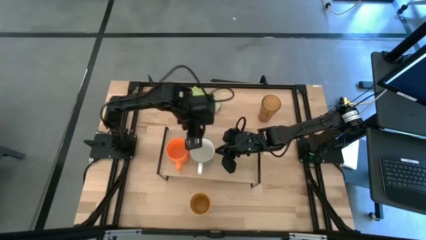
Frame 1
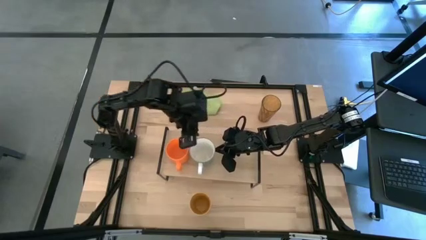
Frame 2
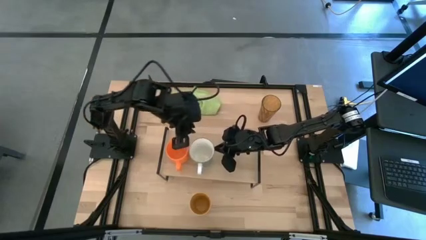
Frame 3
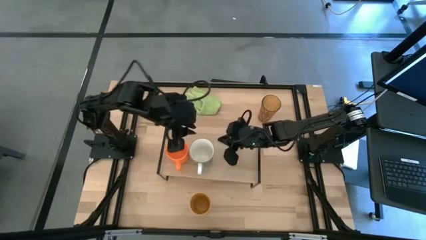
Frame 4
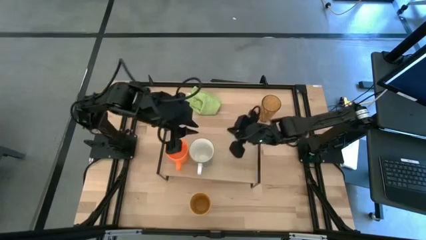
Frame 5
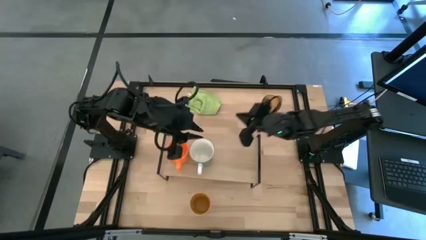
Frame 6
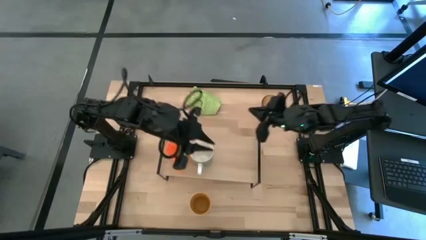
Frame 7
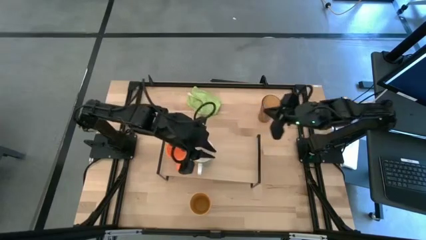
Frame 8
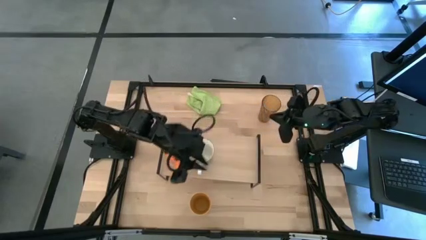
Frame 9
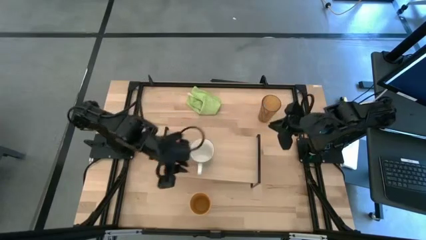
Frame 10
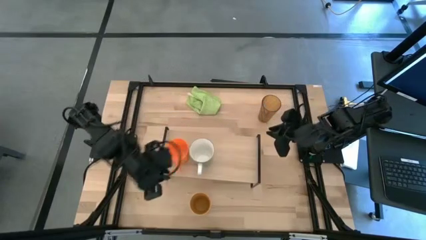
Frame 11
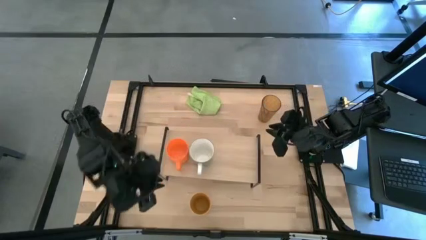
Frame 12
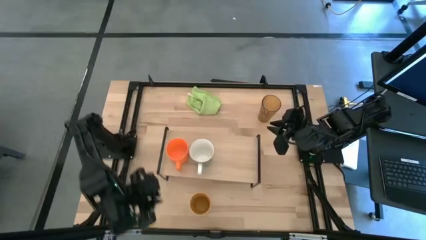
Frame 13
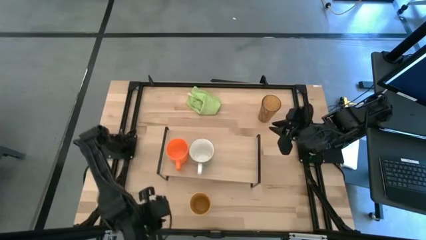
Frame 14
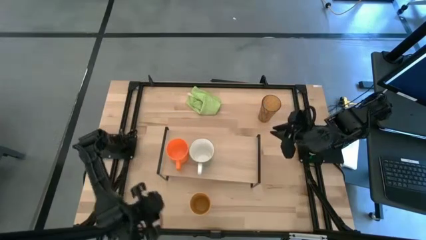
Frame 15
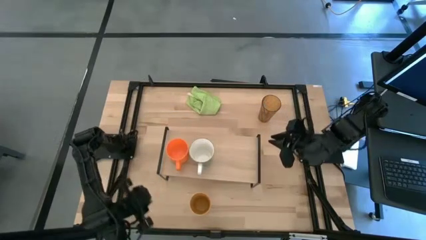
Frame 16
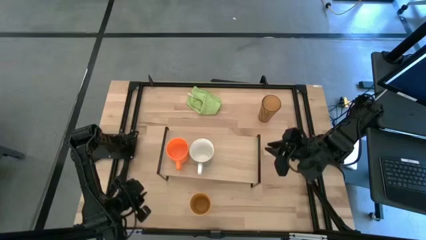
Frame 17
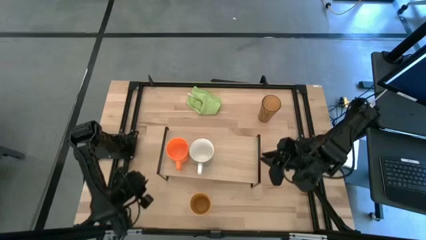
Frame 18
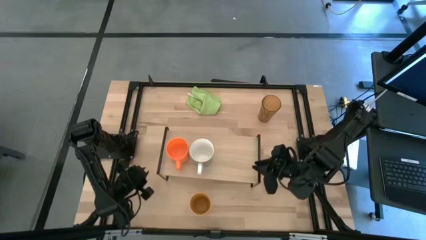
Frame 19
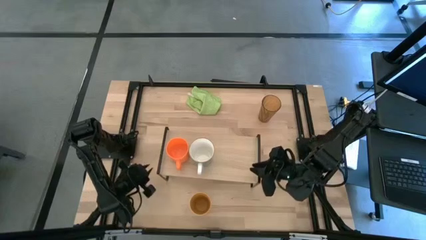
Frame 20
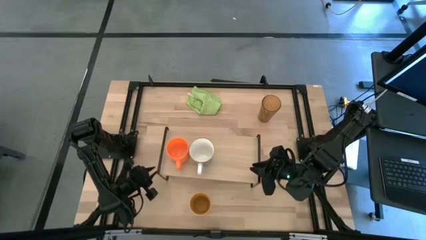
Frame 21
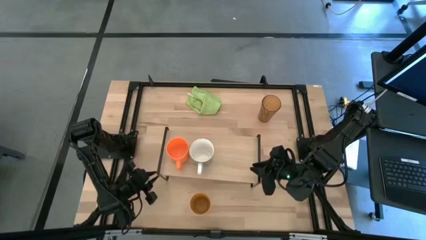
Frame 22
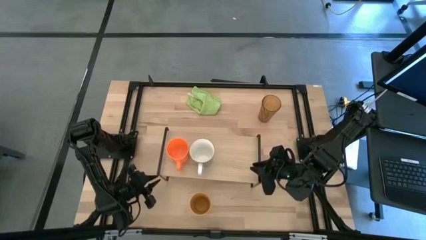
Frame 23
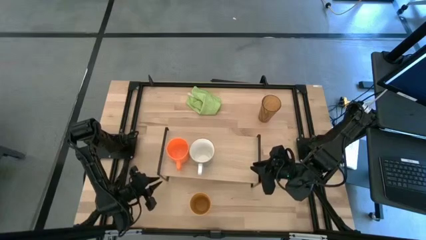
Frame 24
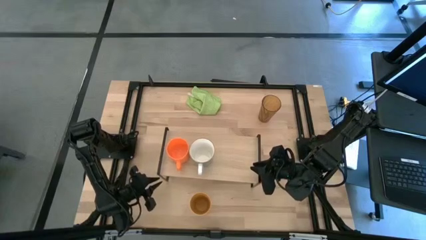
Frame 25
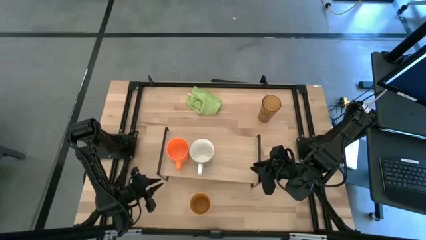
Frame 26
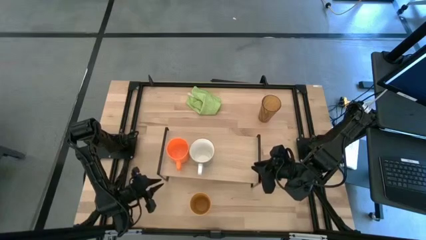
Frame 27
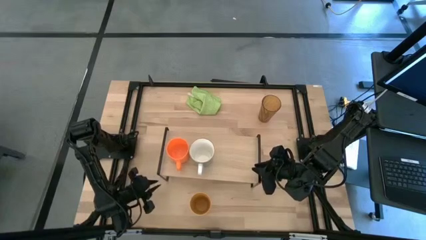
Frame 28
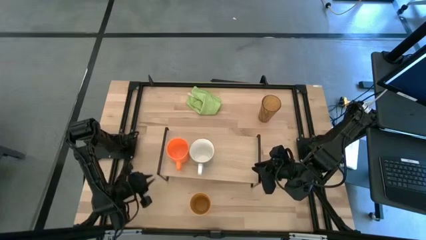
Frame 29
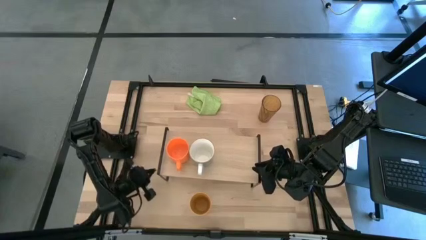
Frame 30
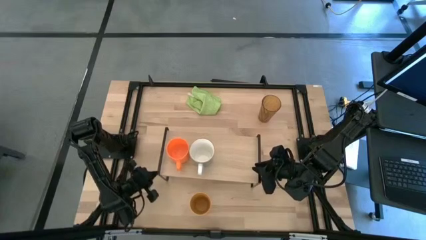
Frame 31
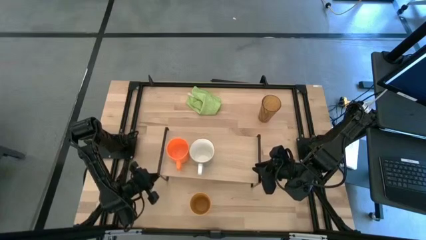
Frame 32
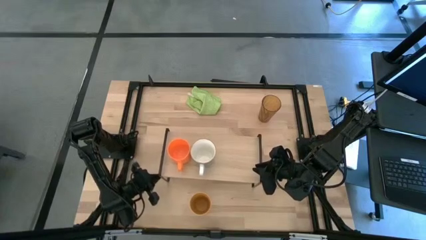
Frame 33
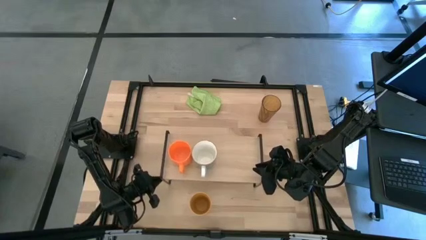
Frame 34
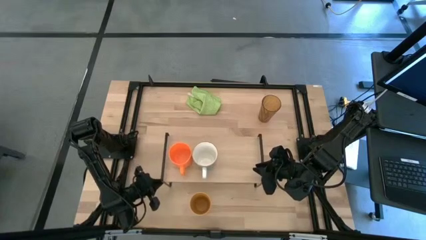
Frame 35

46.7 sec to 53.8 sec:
Task: Stack small to large cups/mugs on shelf
Adjust the shelf

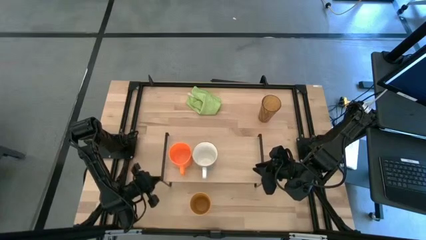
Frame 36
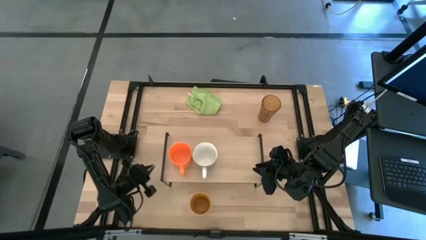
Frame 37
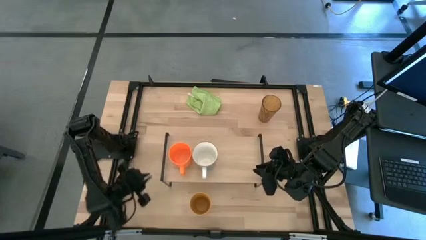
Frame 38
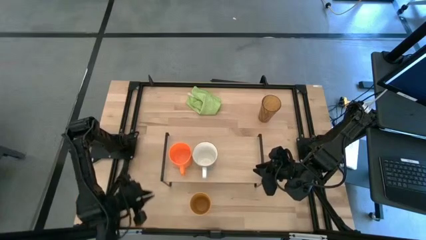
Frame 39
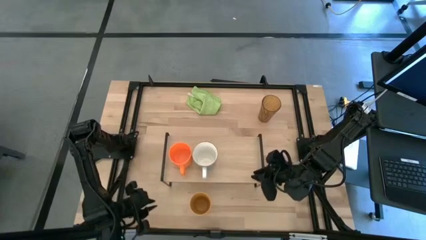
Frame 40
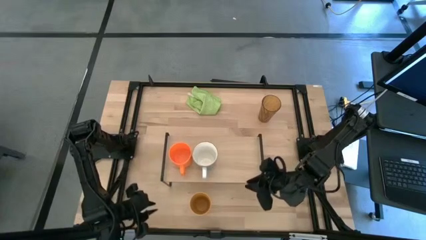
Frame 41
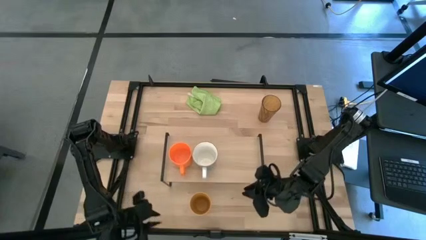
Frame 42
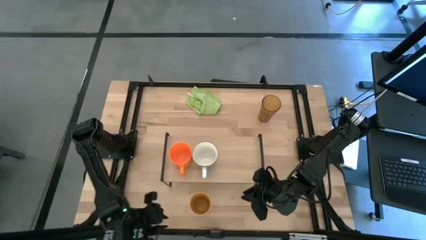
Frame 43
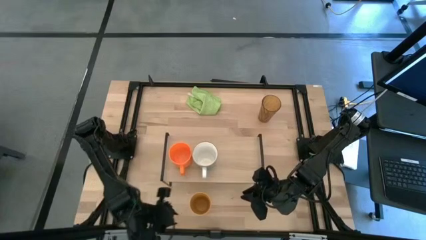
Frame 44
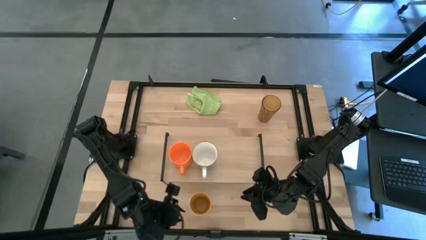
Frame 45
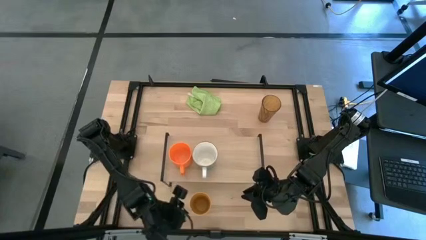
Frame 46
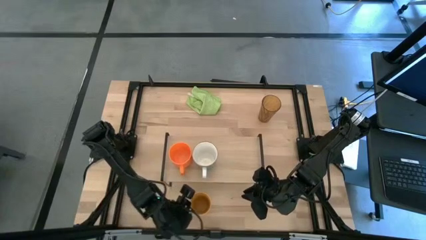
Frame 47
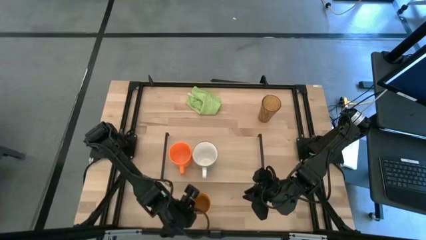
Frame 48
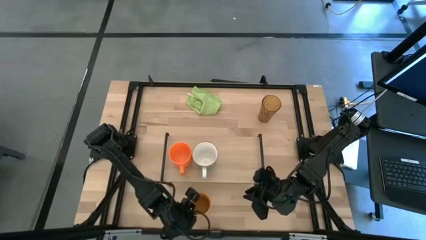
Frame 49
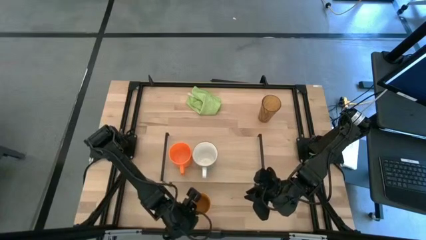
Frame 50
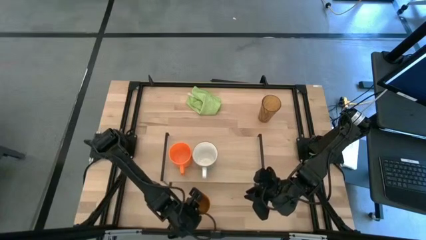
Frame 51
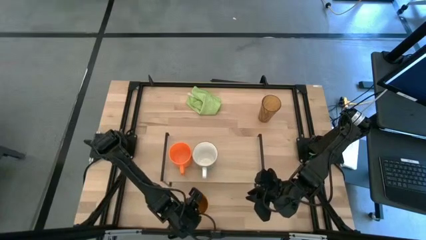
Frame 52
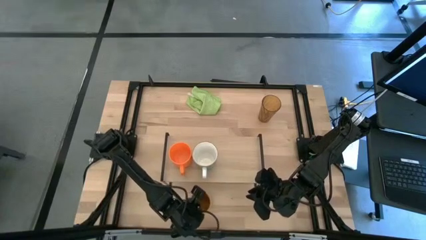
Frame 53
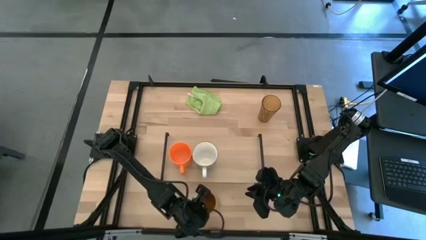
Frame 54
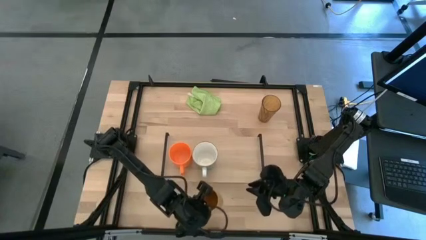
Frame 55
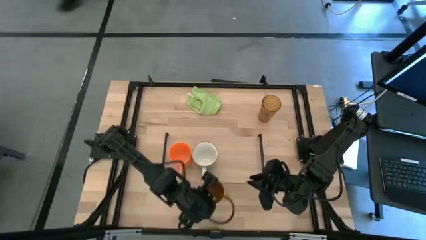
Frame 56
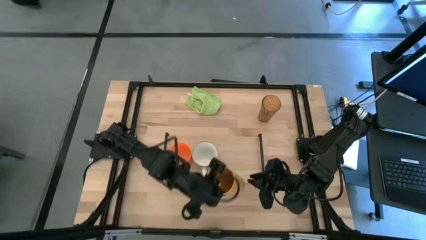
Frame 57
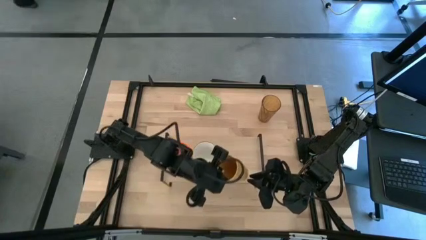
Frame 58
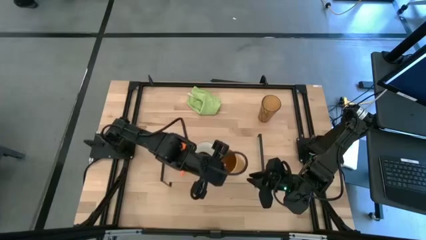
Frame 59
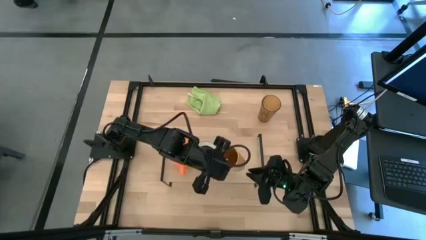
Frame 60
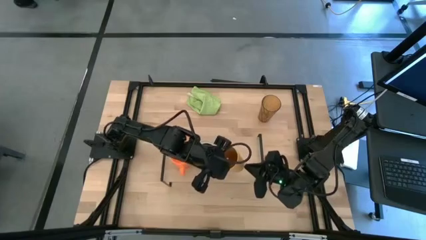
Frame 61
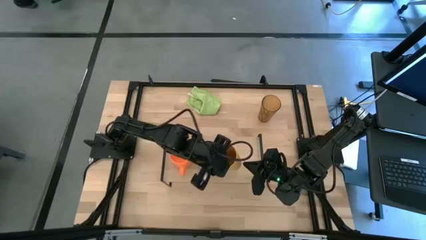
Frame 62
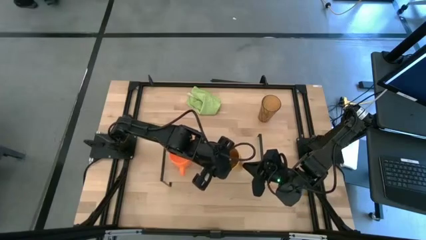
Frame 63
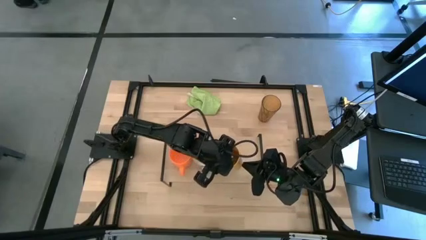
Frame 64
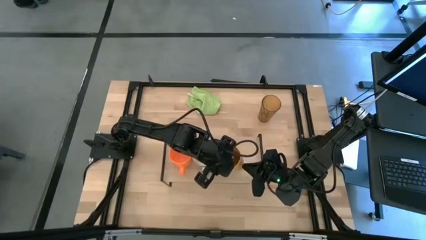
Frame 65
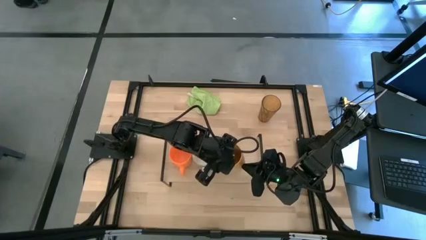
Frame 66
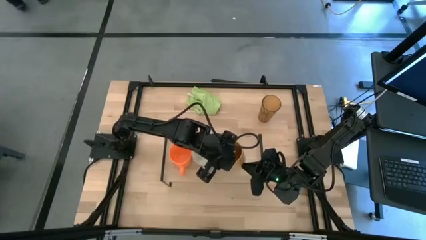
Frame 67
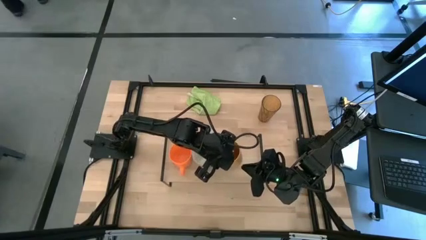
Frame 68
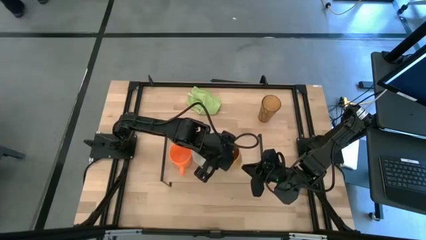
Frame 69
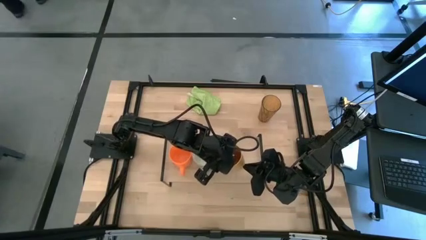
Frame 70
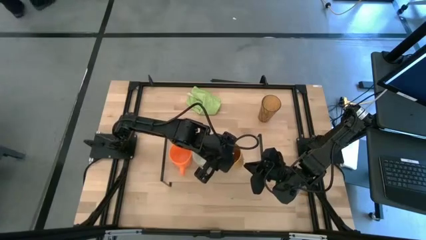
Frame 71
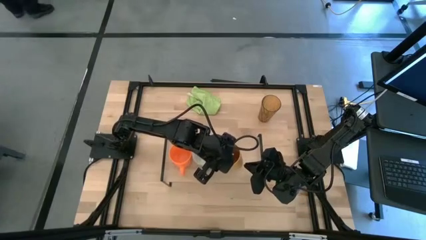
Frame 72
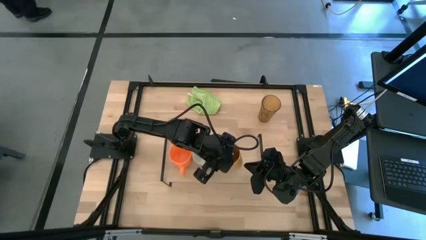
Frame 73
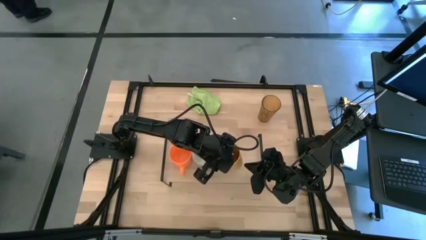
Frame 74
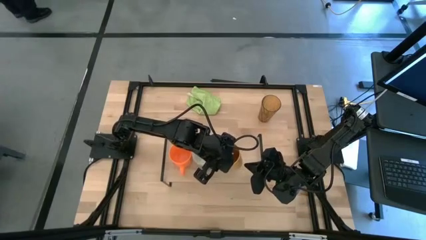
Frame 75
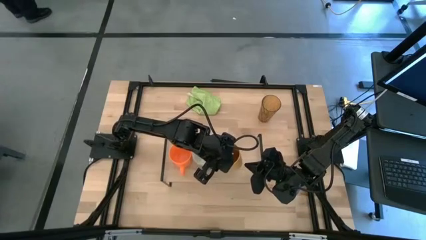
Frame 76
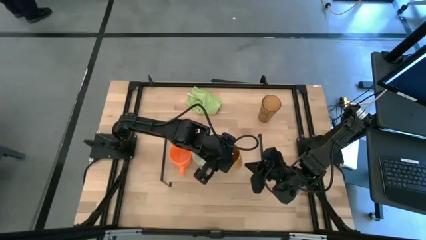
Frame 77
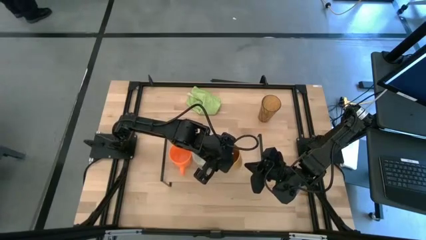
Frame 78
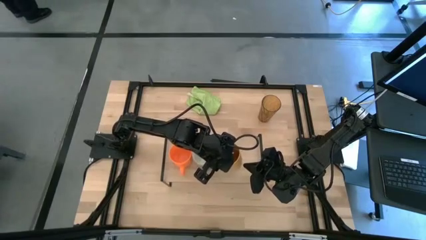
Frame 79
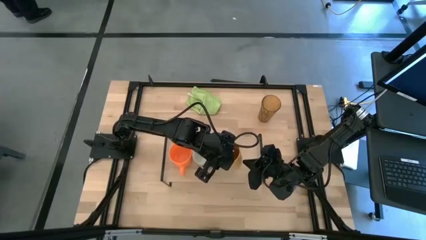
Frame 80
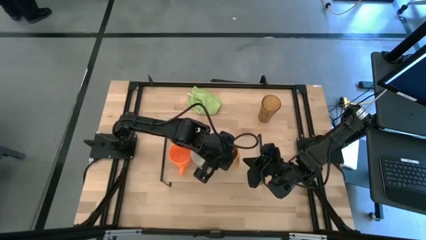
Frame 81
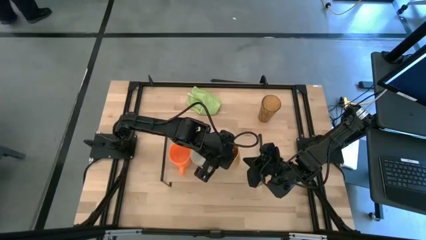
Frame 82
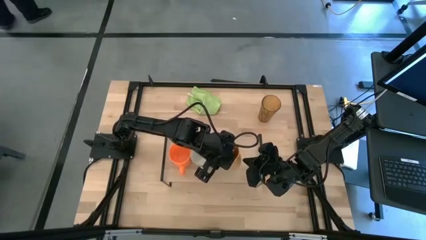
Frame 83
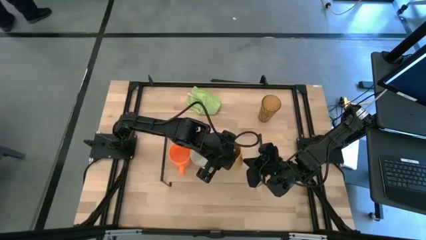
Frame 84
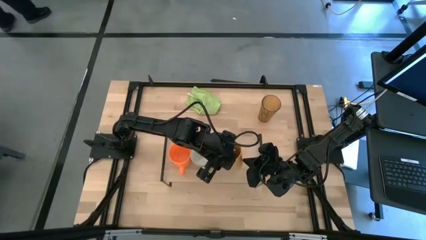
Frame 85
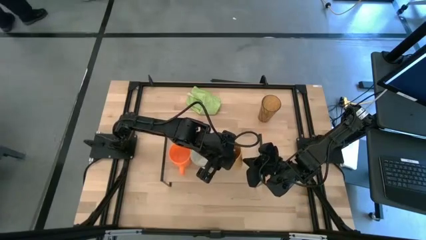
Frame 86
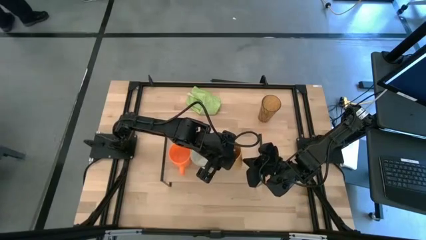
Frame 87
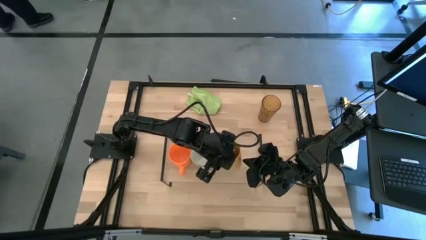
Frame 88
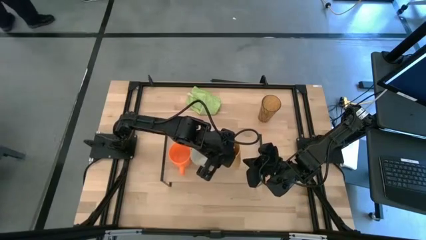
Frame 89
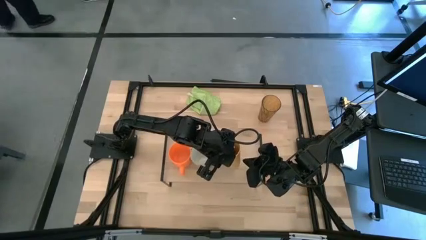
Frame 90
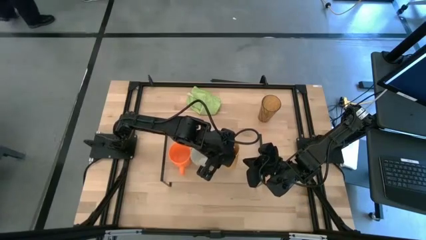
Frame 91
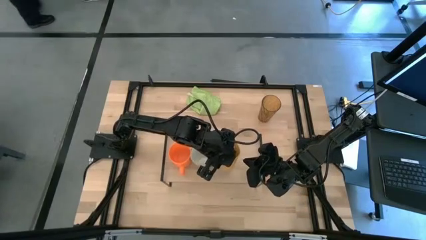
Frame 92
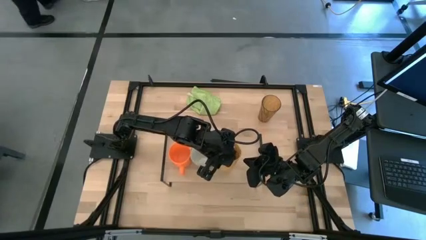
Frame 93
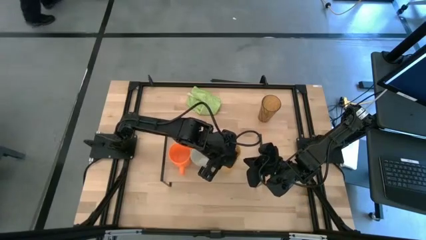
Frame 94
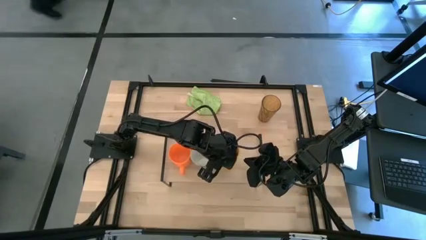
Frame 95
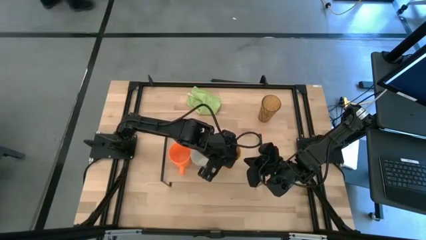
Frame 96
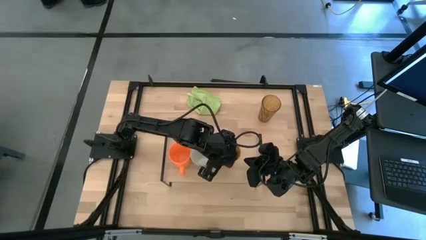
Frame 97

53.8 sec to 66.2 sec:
Put the yellow cup on the shelf
